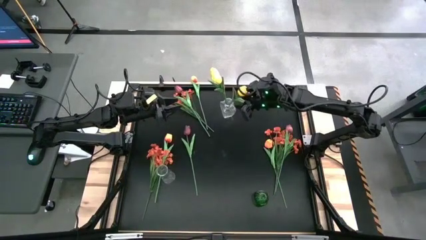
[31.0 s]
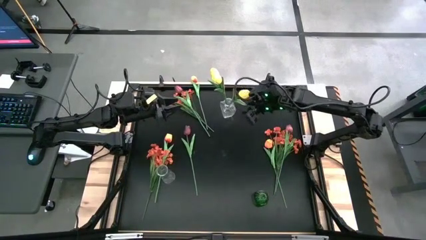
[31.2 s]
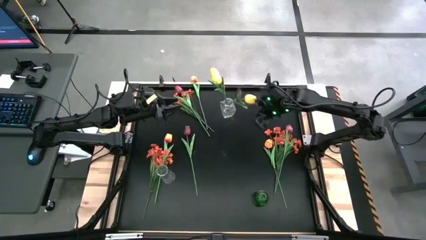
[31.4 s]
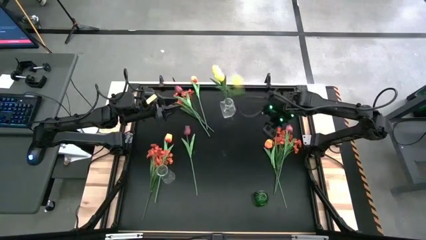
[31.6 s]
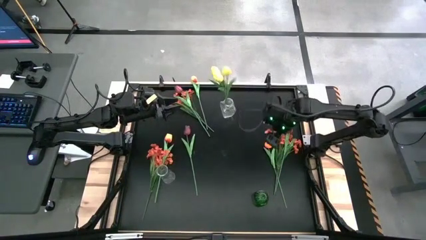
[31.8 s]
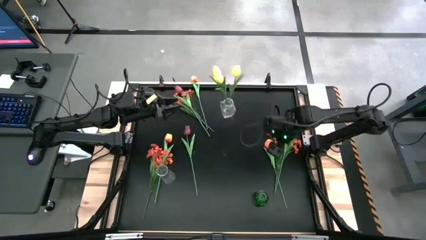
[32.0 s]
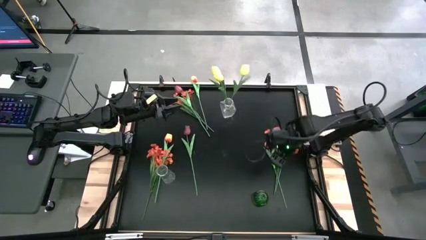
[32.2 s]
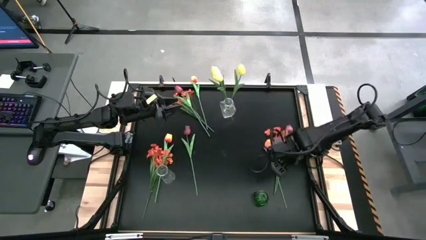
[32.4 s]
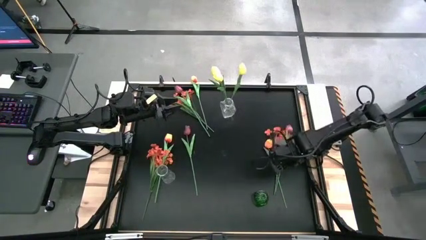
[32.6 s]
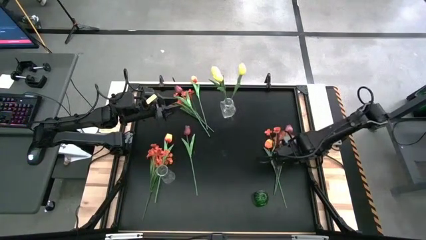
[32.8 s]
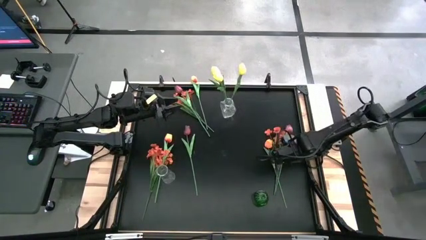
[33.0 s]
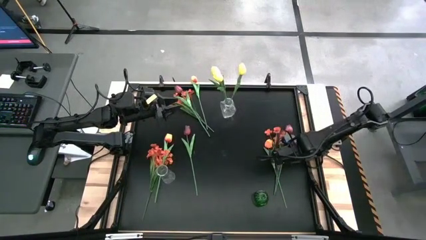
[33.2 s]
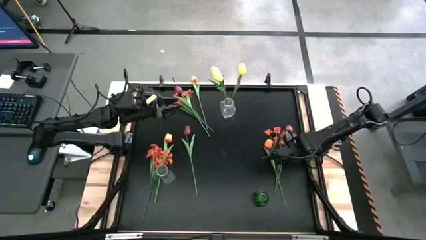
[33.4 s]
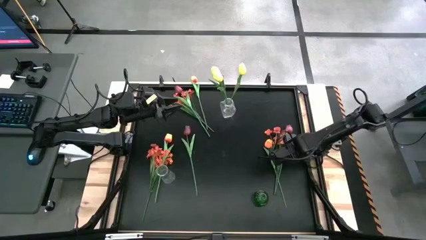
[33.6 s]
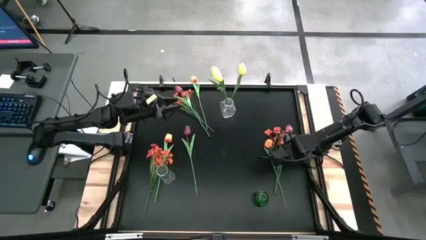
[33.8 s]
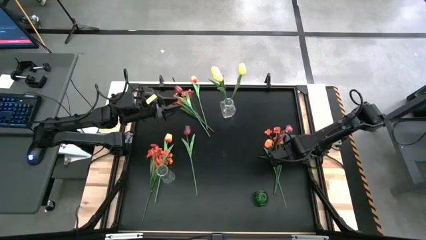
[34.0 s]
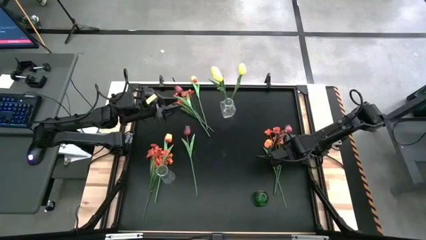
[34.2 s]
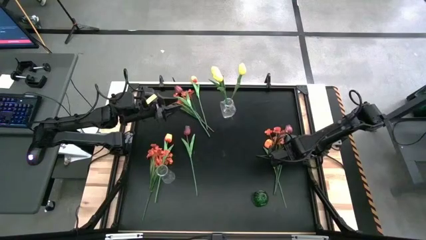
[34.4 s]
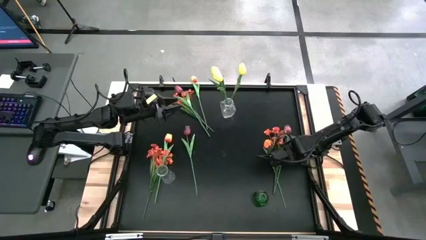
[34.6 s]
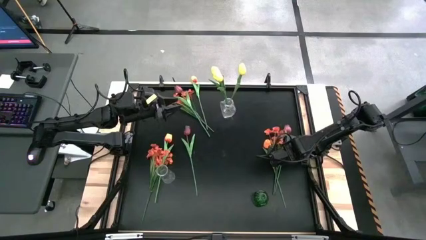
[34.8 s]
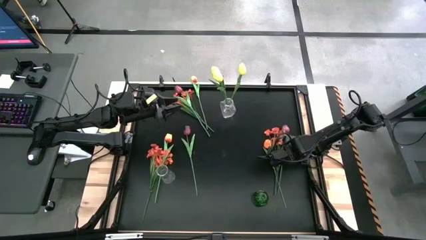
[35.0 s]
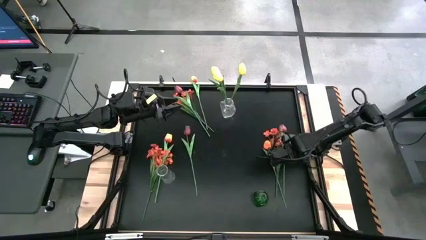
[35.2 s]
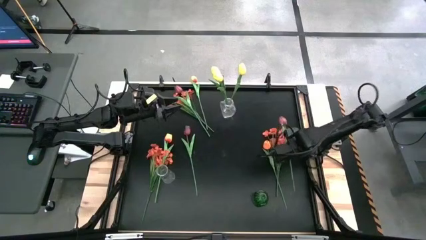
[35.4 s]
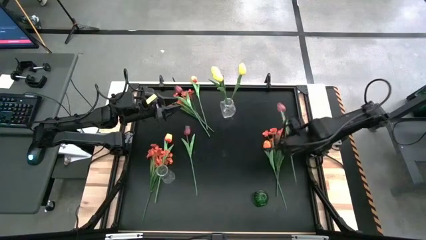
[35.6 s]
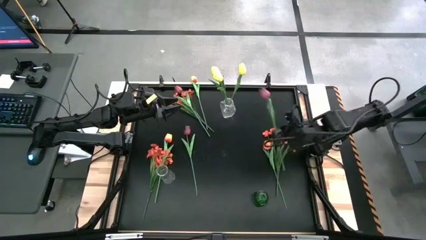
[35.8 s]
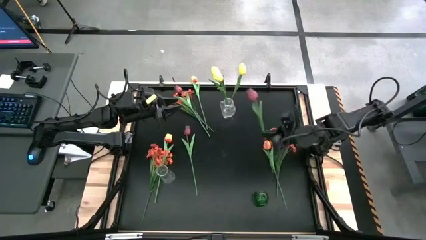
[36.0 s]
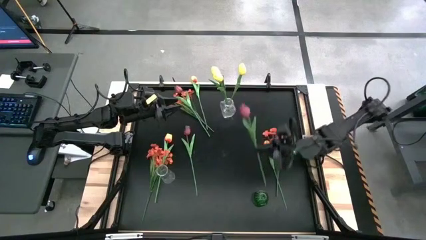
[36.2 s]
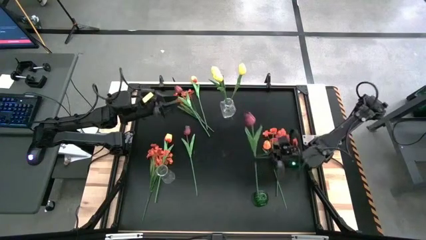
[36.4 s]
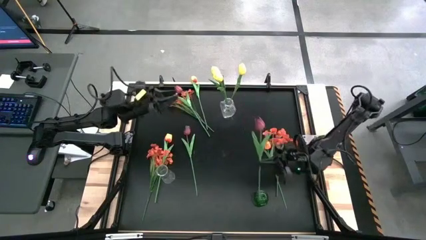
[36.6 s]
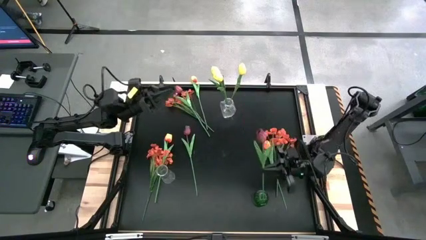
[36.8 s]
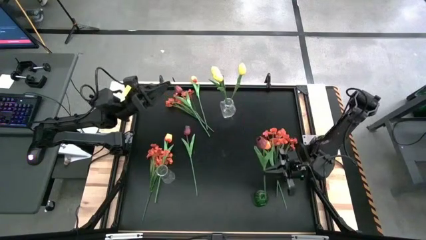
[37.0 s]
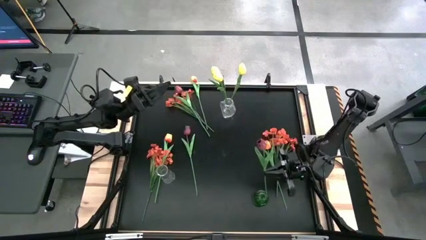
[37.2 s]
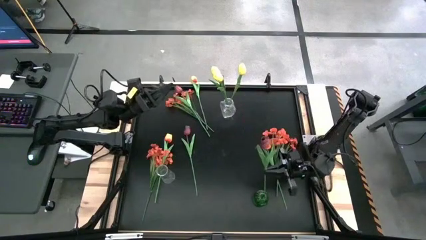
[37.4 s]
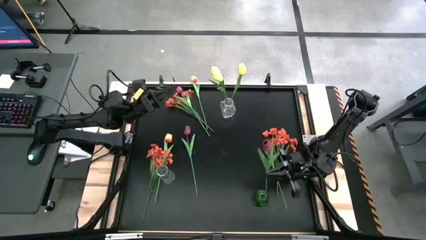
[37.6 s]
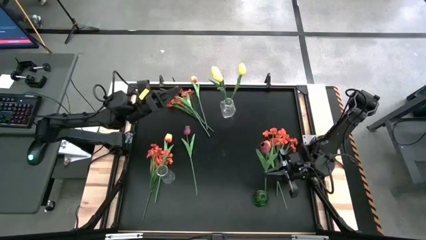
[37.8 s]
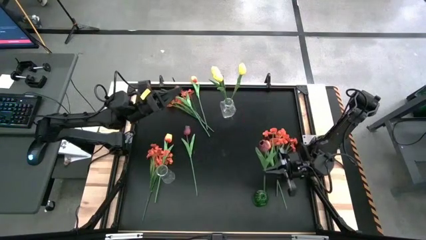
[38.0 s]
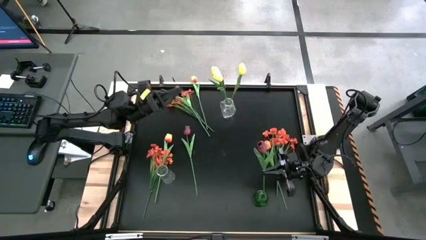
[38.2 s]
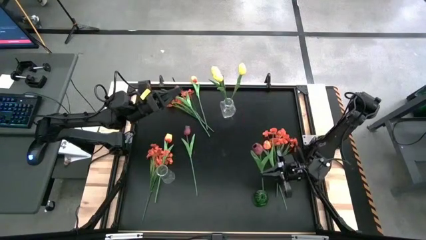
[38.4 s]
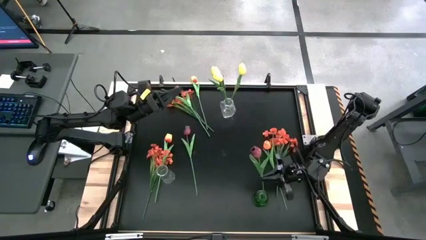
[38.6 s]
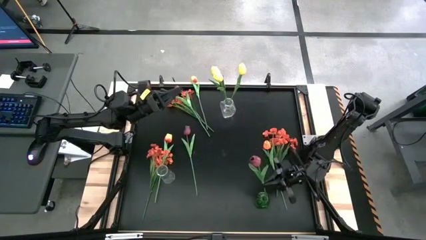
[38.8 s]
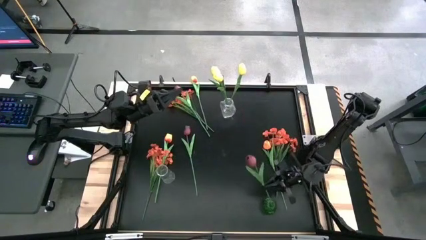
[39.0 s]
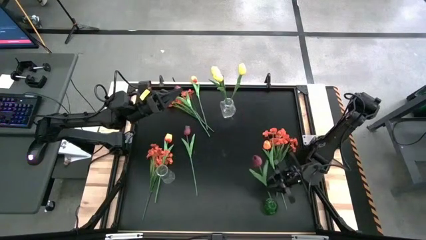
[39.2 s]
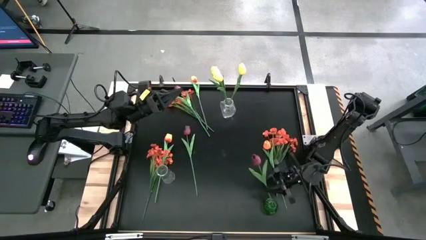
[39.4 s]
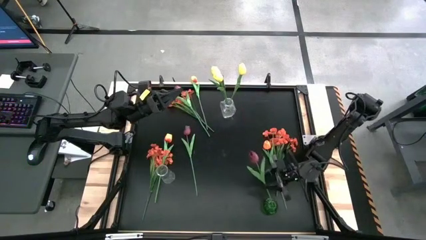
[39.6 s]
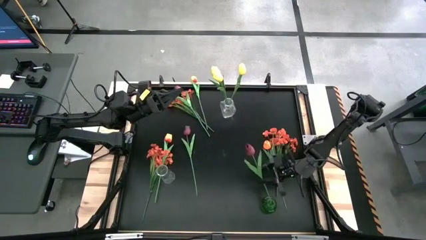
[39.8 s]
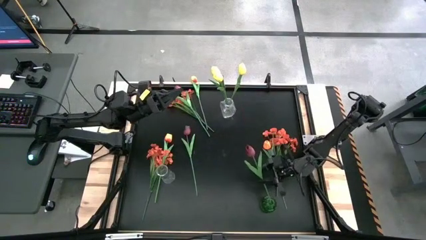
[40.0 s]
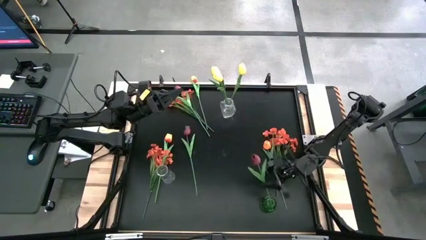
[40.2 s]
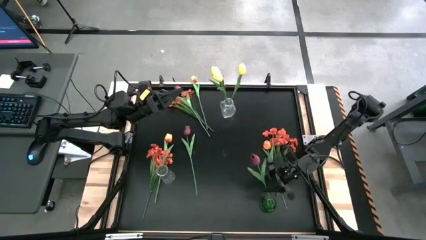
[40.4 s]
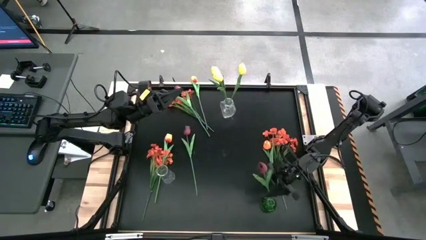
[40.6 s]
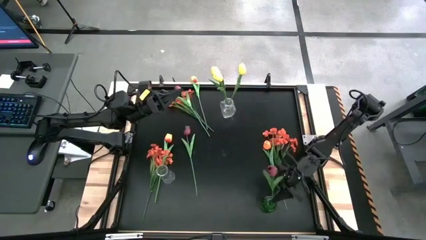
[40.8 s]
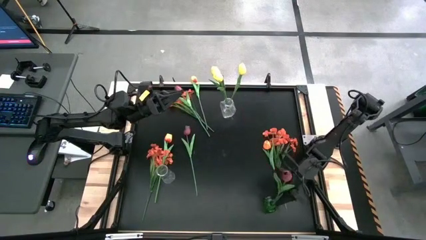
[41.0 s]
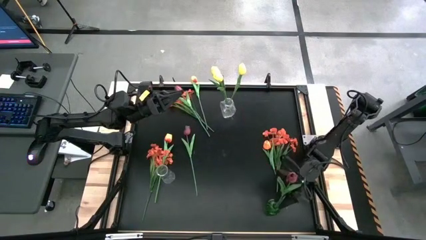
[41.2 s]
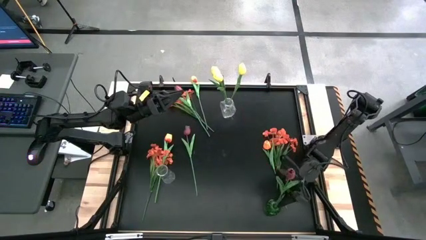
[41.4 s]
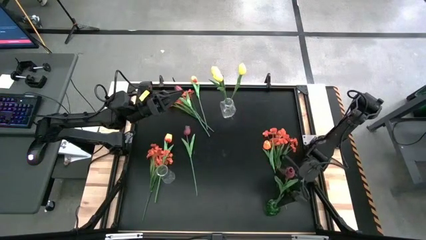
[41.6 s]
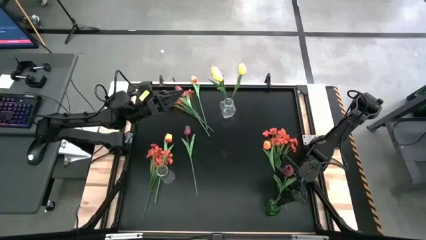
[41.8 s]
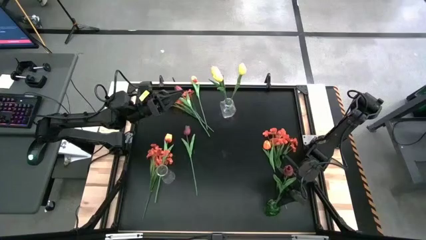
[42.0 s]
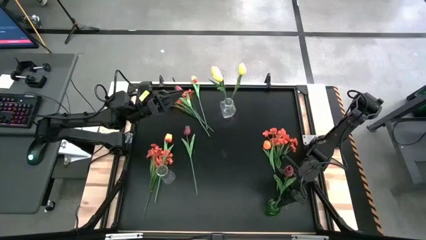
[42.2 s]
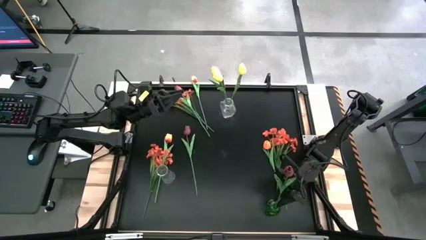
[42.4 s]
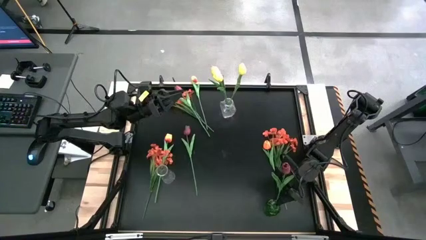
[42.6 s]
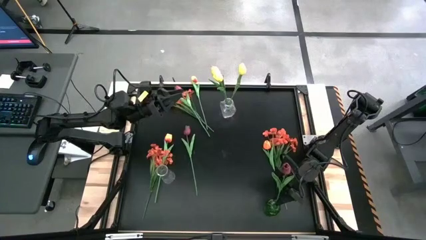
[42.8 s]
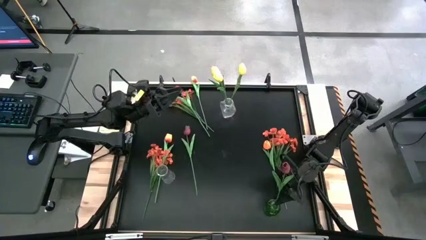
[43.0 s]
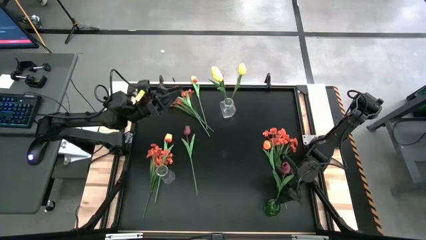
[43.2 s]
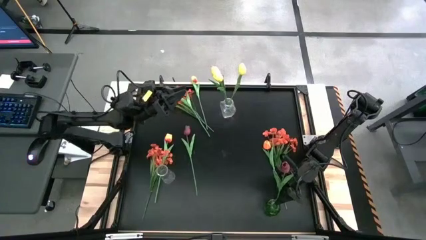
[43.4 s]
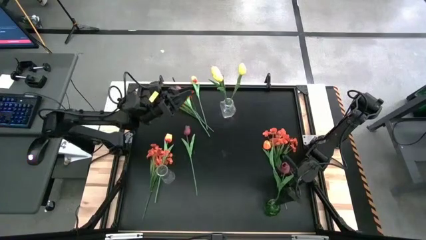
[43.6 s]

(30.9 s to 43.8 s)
Task: Sort flowers into vase by color
Put the right red tulip into the green vase

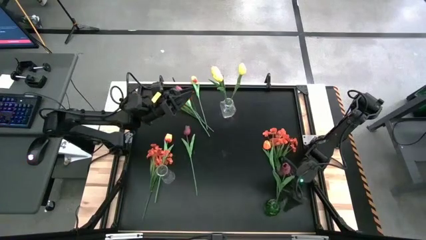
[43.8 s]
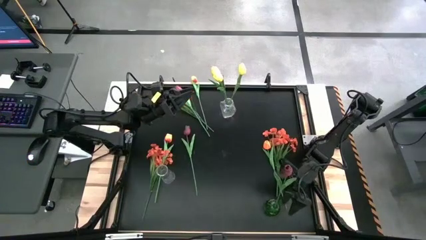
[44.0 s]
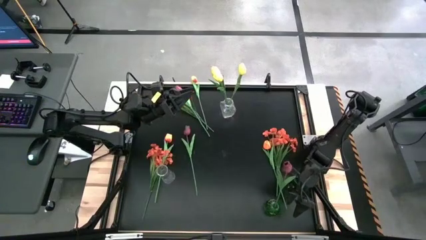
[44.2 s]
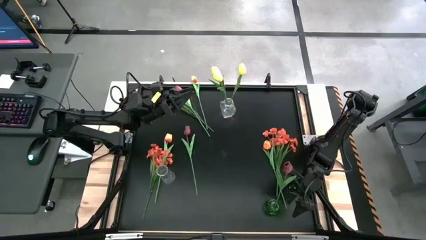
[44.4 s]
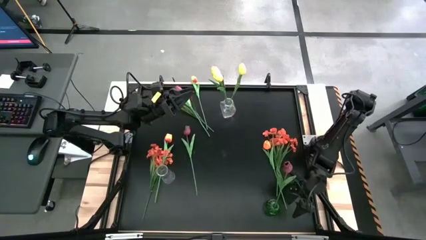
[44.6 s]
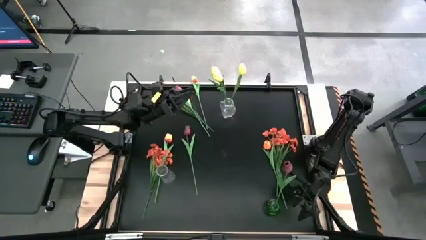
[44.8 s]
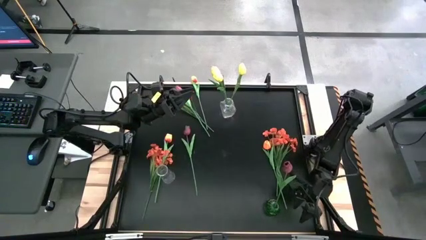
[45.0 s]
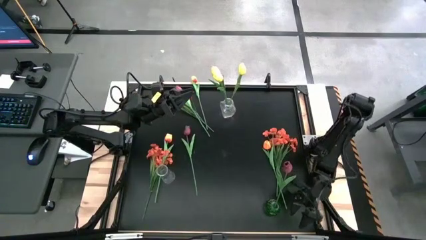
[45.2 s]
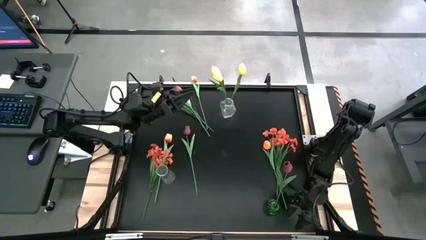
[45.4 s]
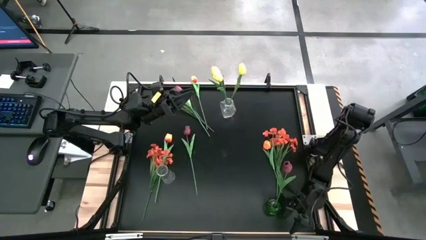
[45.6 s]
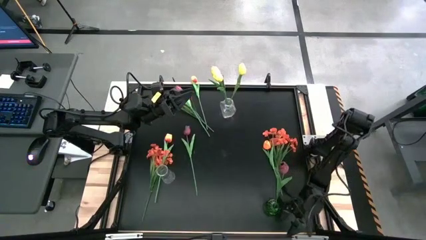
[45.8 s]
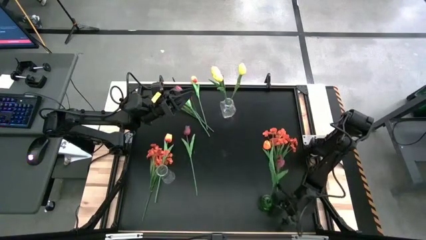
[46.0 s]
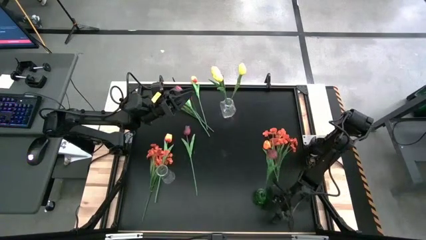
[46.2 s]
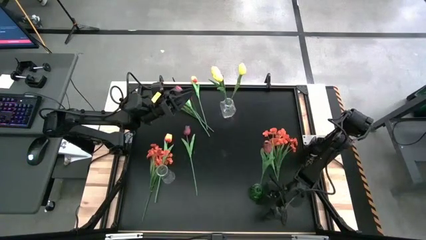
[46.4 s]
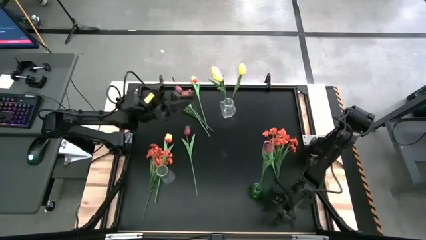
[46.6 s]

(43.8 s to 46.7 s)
Adjust the green vase
